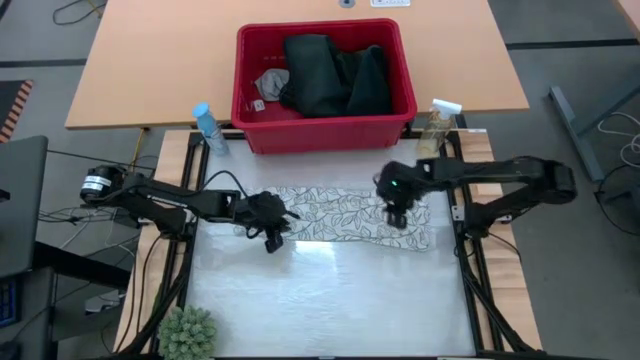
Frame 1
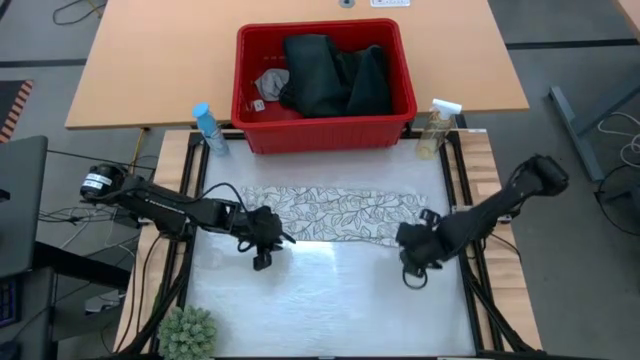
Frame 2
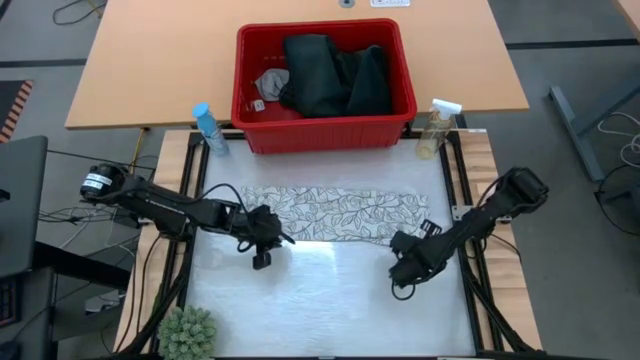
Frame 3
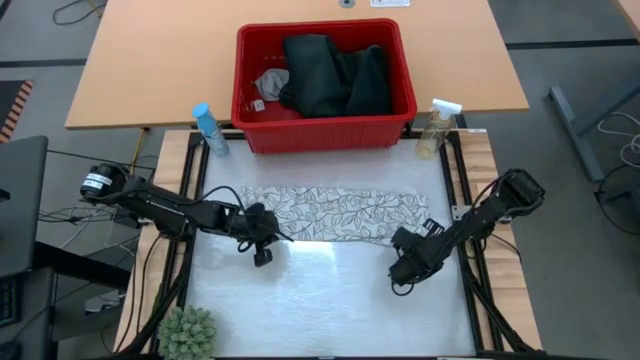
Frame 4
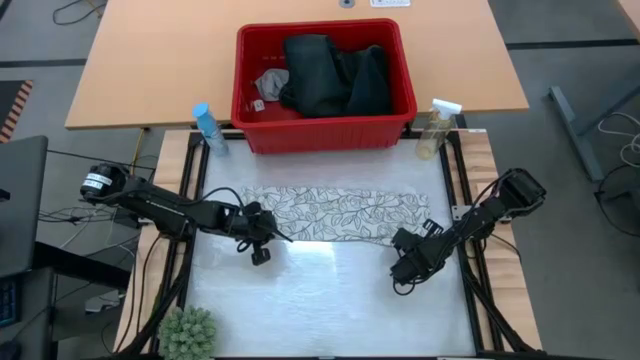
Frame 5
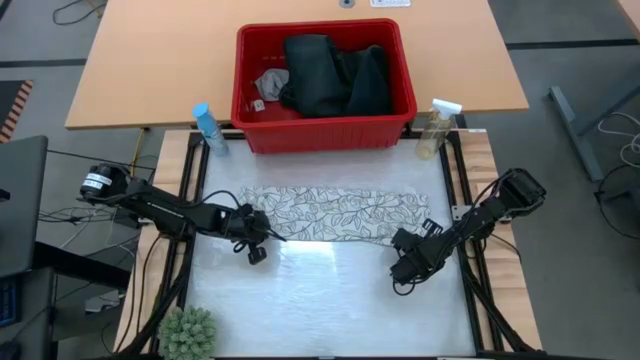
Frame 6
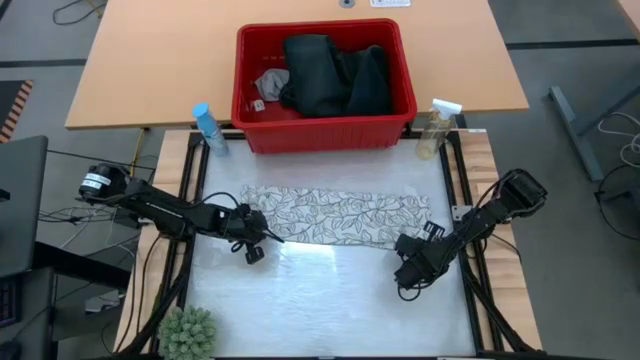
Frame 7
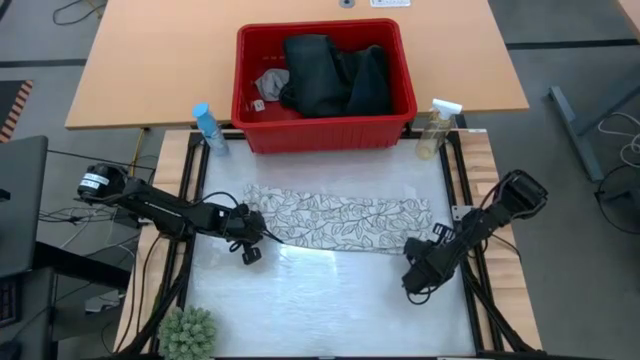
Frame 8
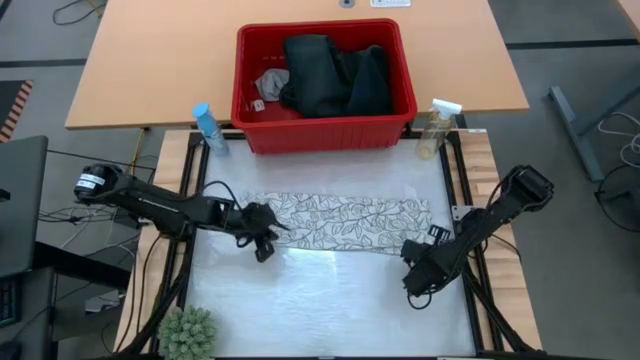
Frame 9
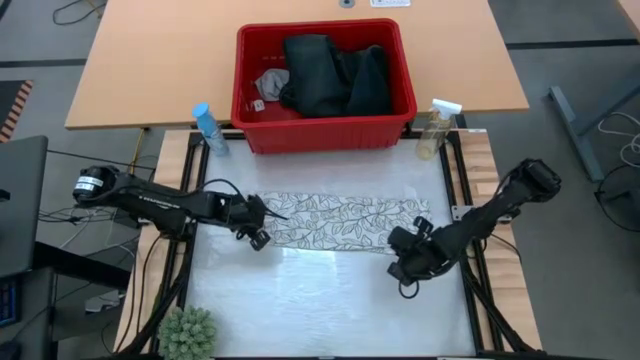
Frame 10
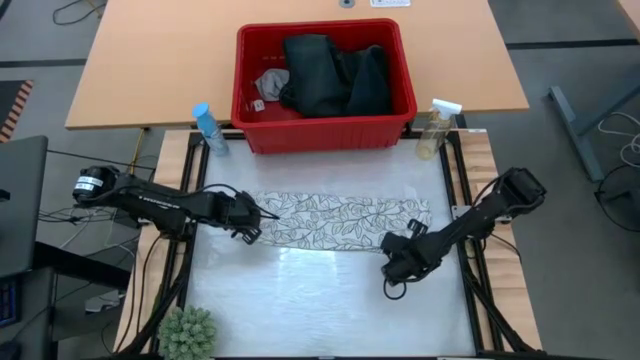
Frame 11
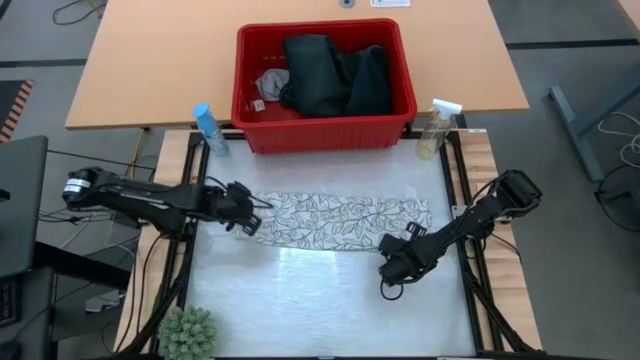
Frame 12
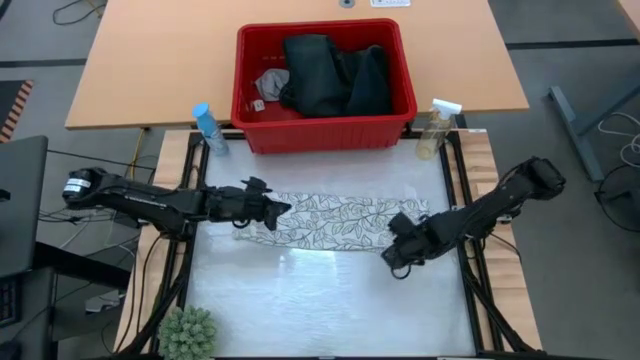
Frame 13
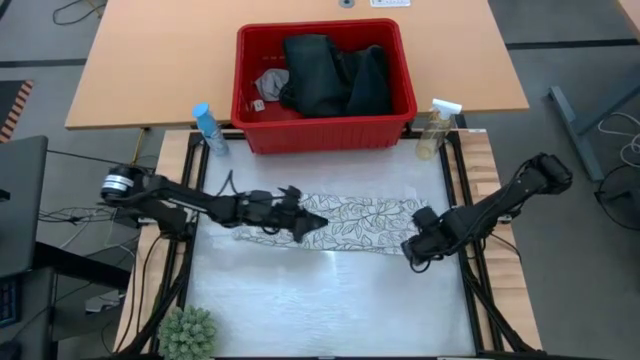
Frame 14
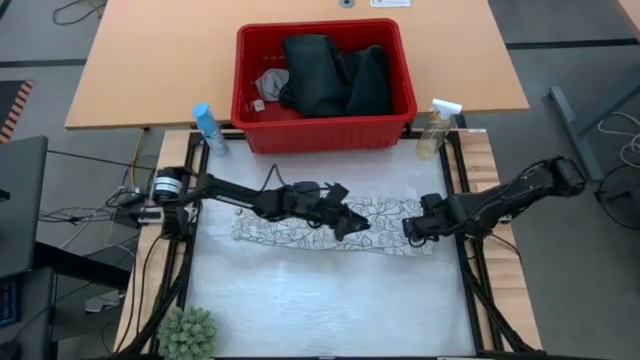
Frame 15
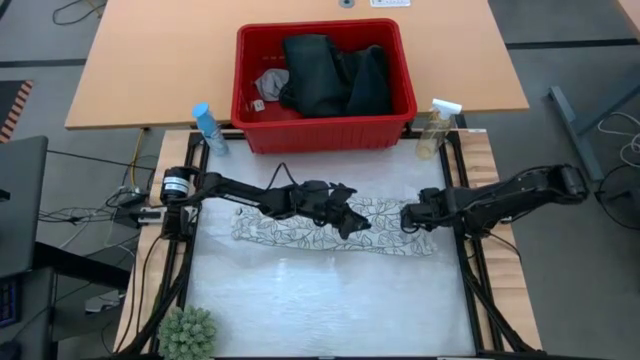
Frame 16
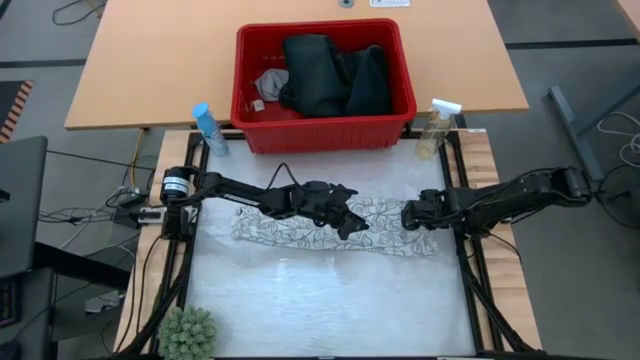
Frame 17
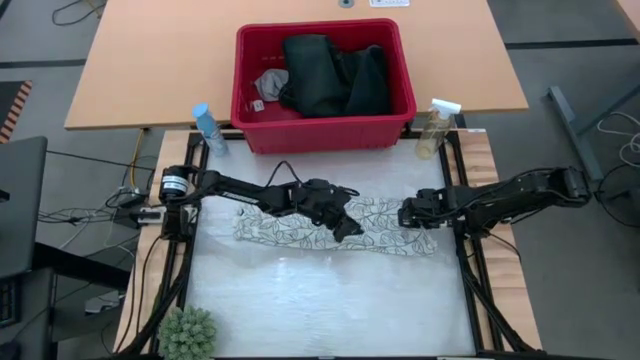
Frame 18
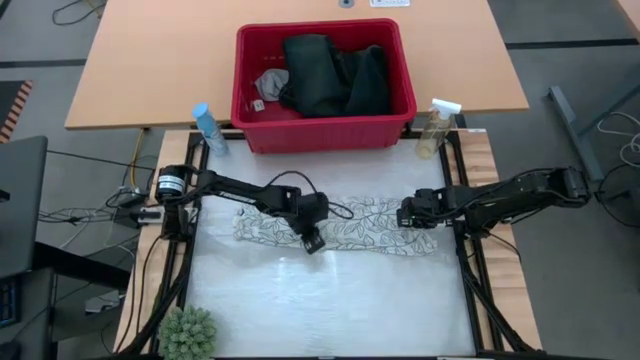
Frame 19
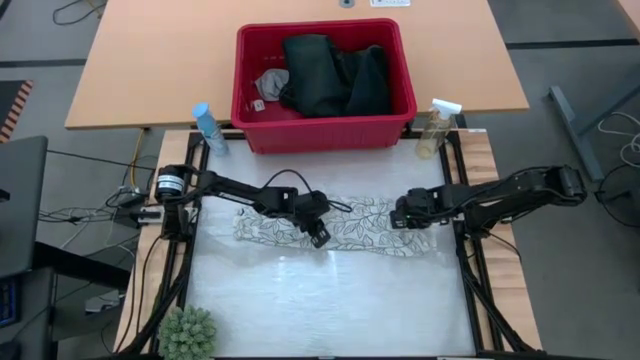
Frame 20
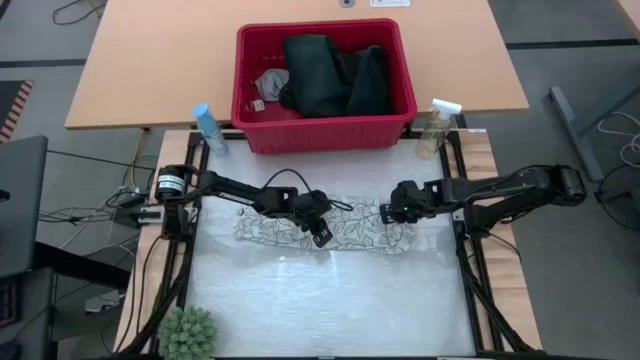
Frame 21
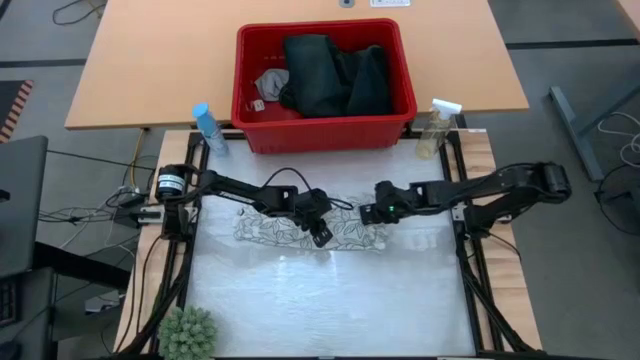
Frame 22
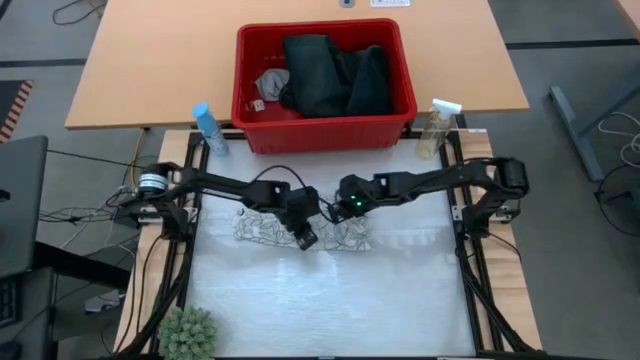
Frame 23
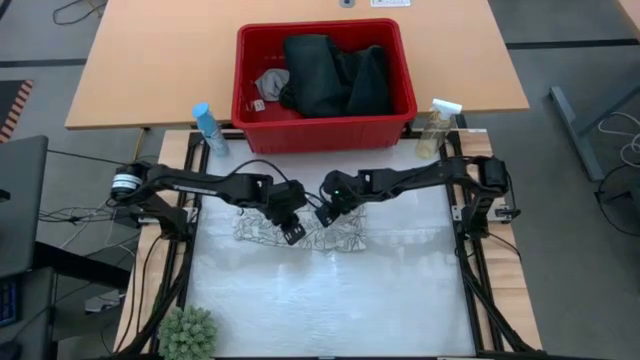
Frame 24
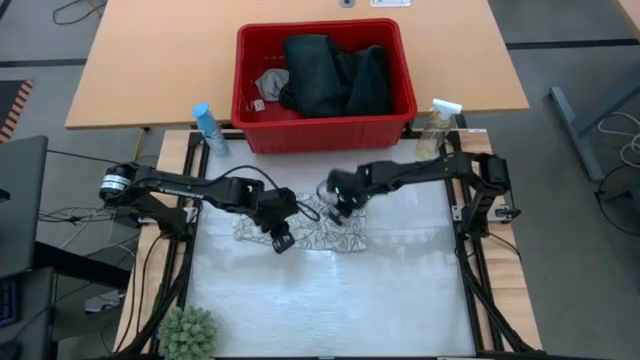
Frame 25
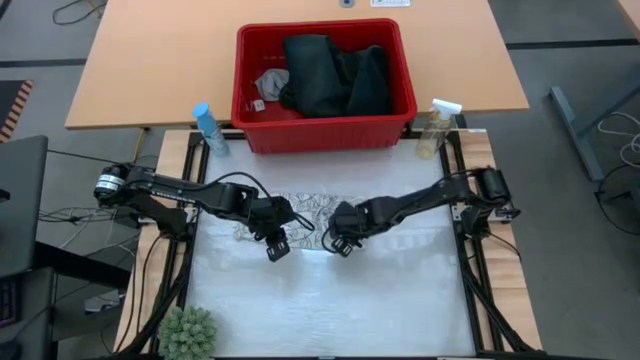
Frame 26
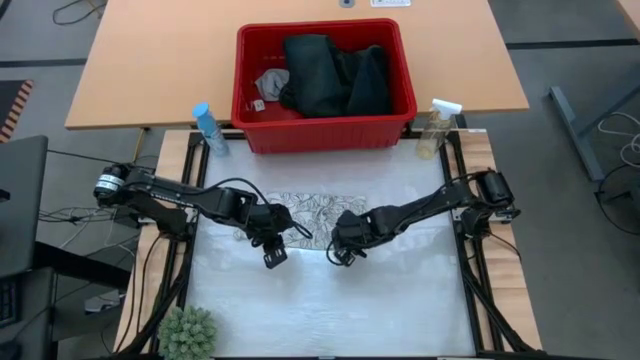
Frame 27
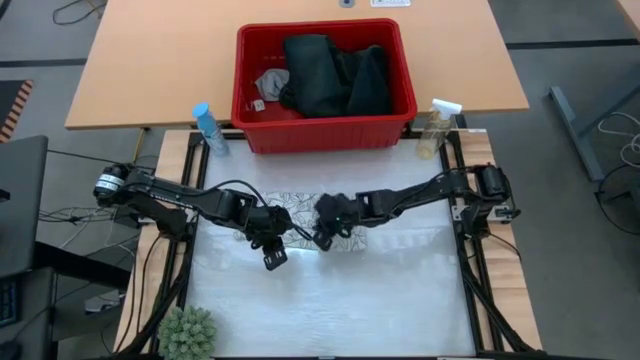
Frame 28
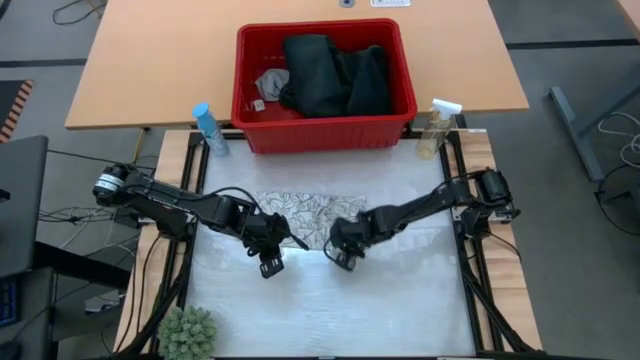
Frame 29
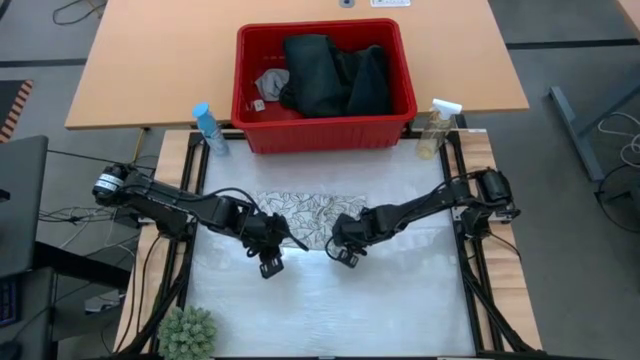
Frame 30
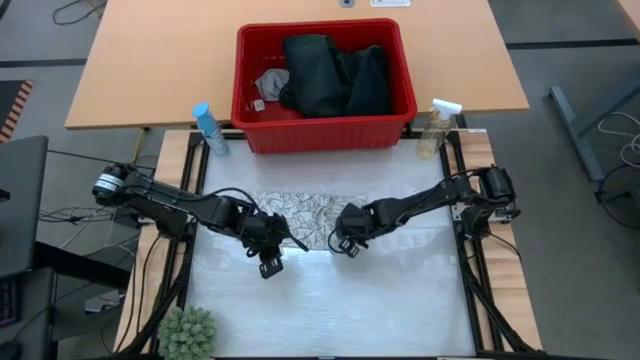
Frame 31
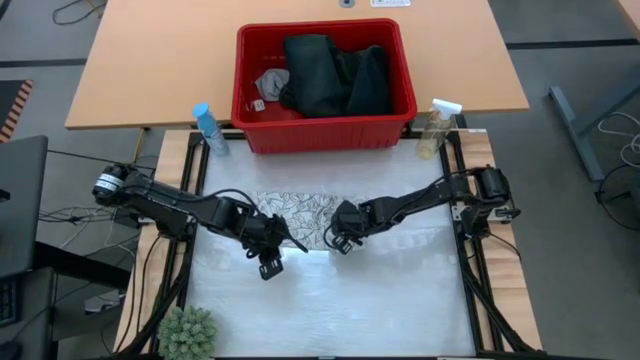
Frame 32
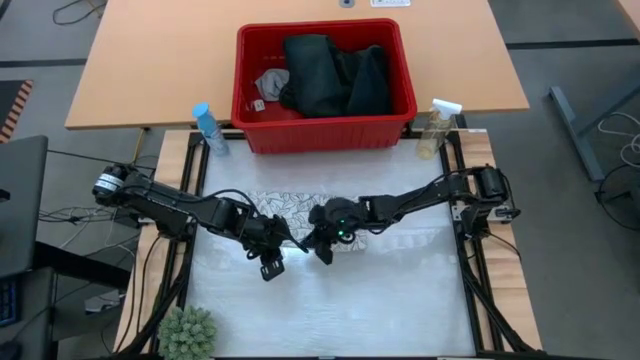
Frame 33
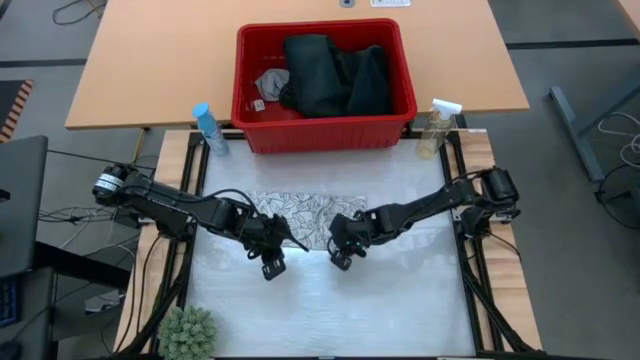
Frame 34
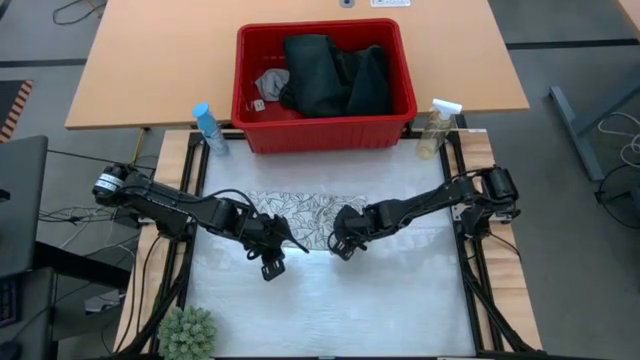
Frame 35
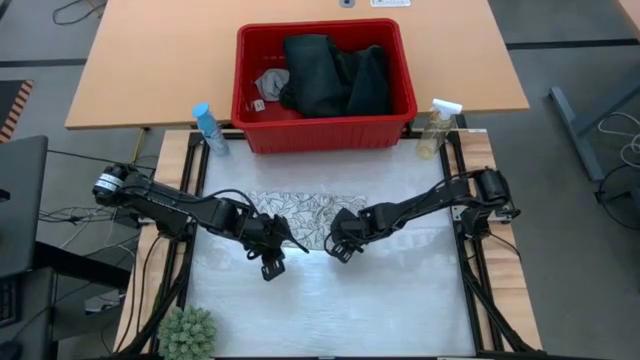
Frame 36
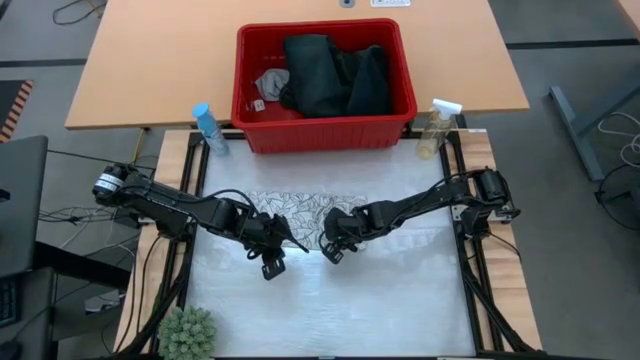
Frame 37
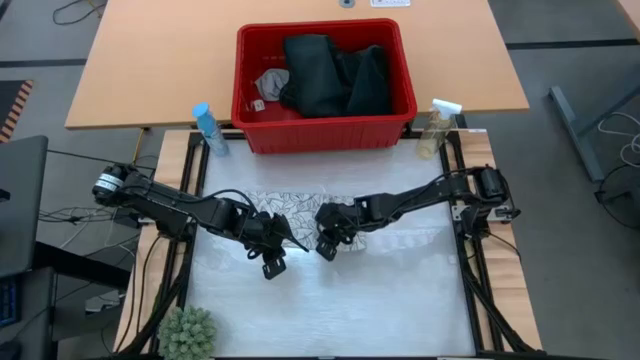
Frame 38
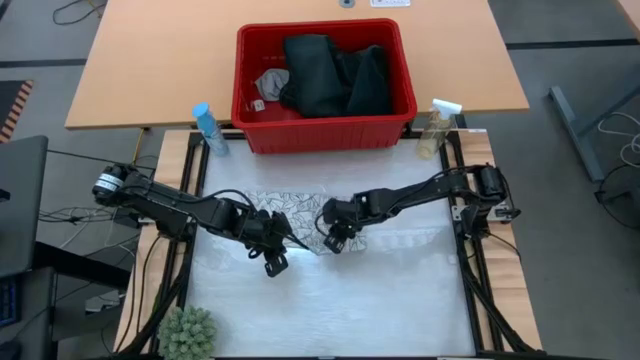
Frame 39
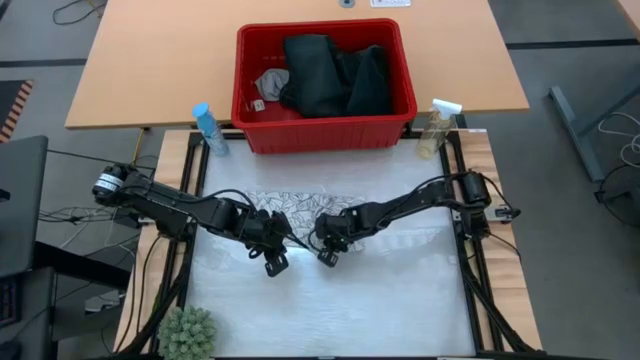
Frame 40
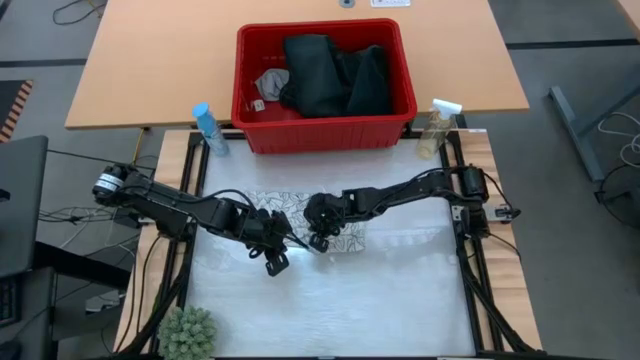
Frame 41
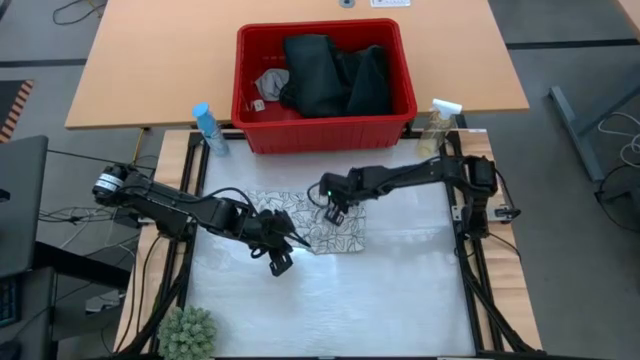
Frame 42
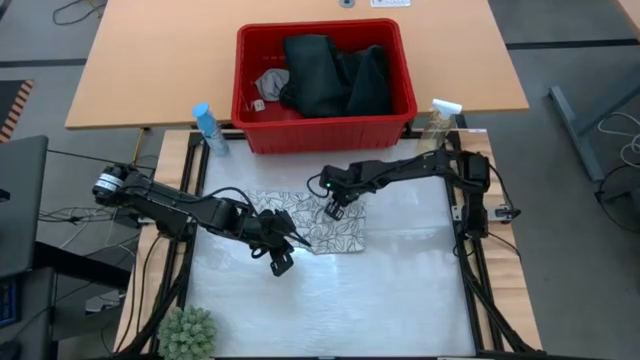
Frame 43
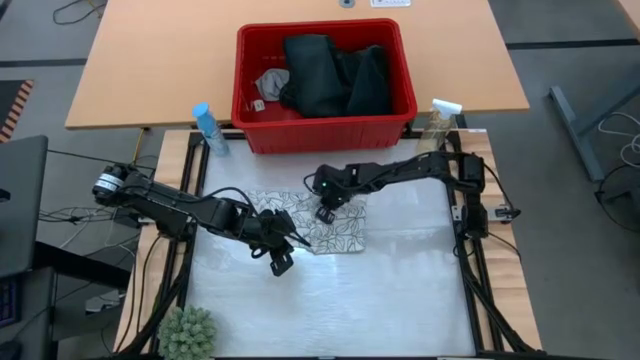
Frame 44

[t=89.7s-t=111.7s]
Task: Fold laundry
Fold the white-patterned shirt
